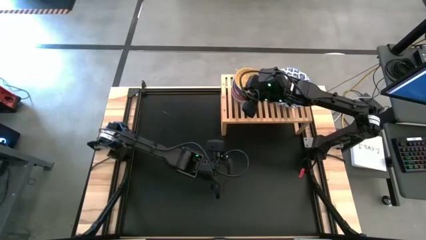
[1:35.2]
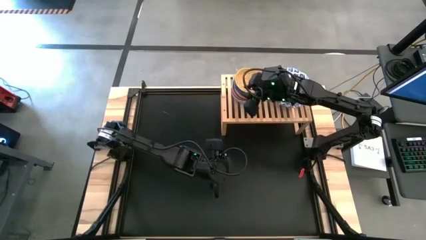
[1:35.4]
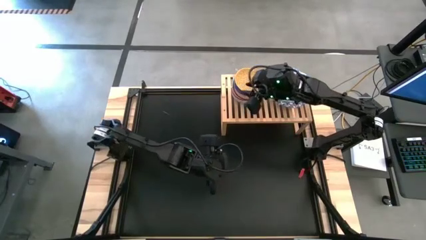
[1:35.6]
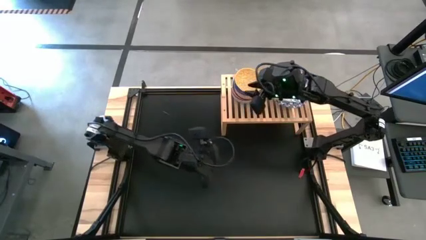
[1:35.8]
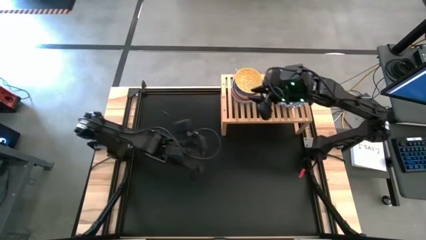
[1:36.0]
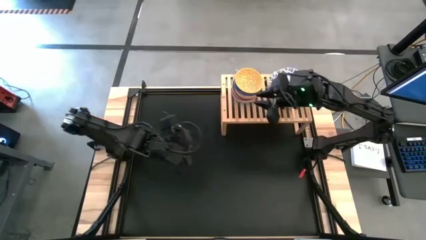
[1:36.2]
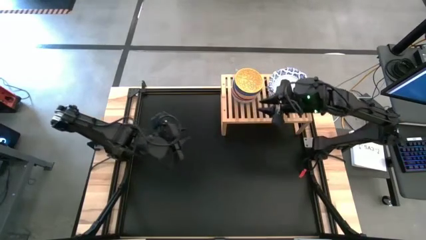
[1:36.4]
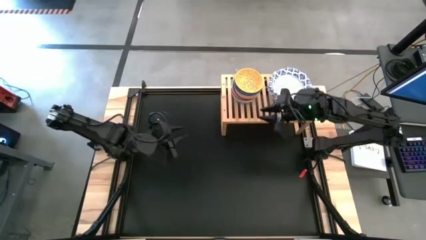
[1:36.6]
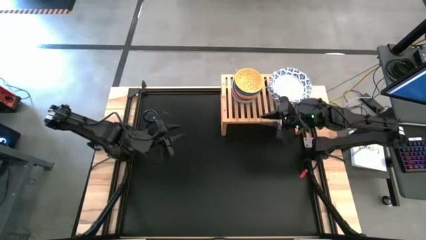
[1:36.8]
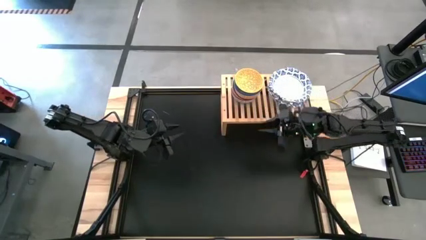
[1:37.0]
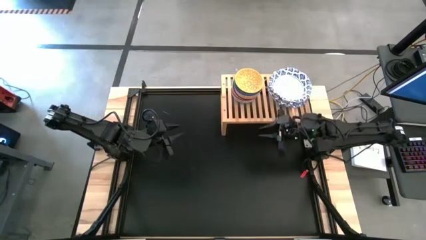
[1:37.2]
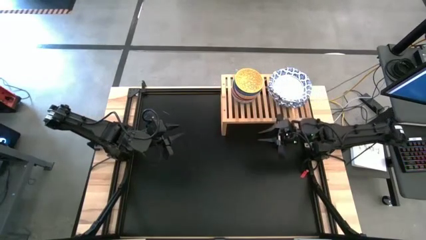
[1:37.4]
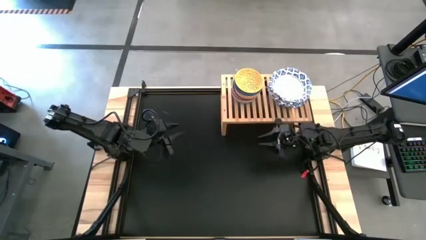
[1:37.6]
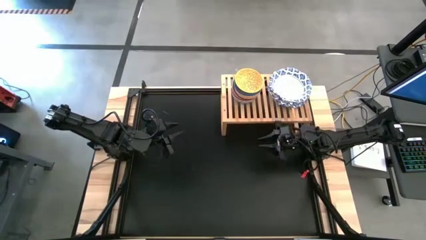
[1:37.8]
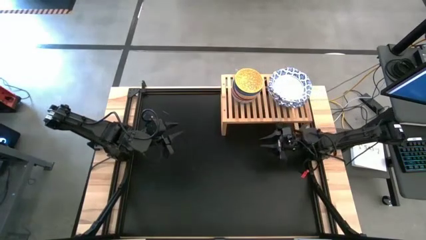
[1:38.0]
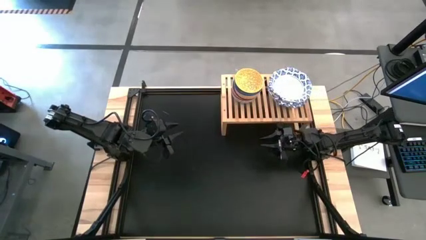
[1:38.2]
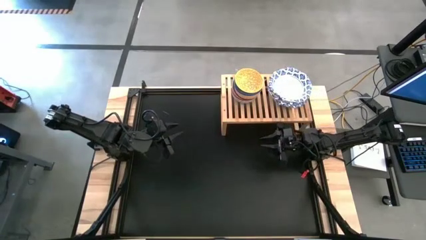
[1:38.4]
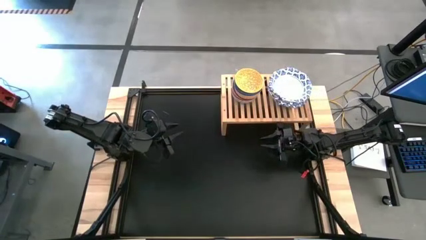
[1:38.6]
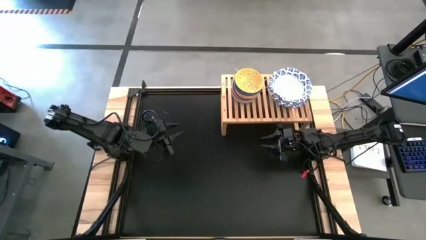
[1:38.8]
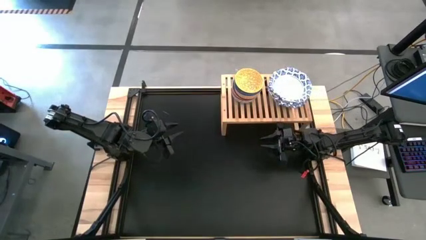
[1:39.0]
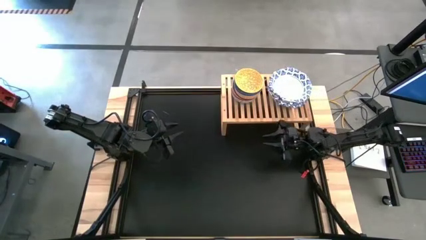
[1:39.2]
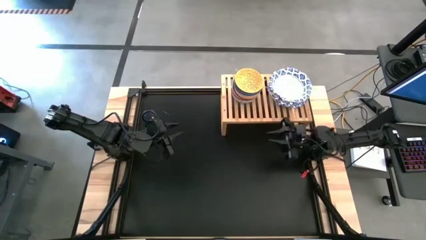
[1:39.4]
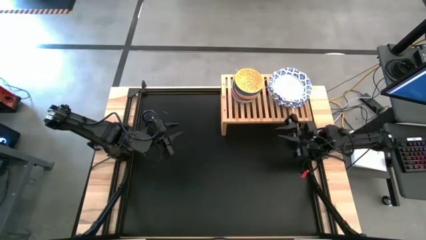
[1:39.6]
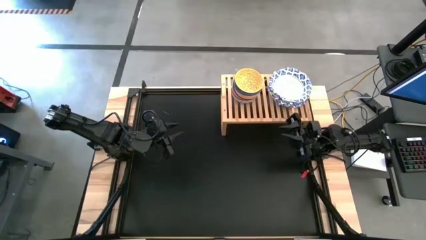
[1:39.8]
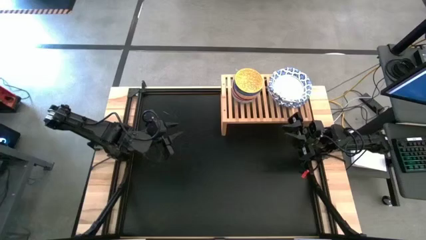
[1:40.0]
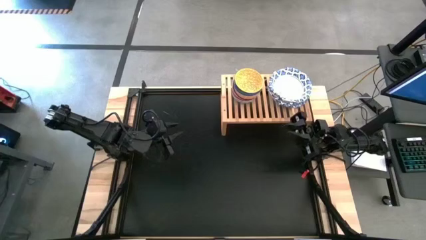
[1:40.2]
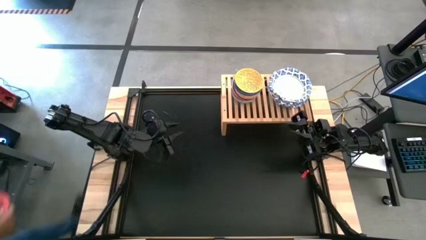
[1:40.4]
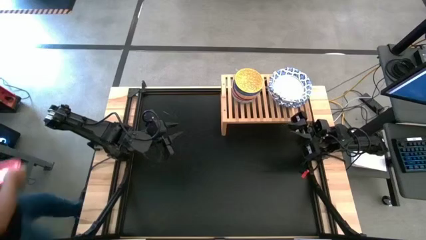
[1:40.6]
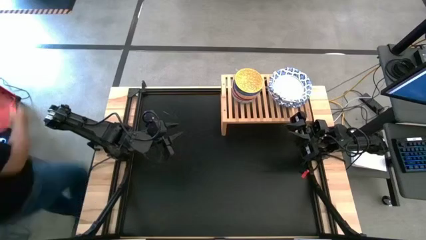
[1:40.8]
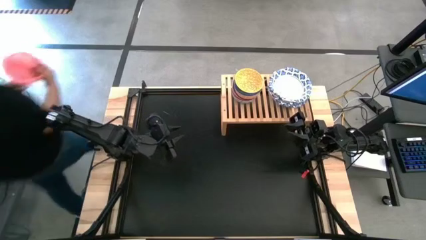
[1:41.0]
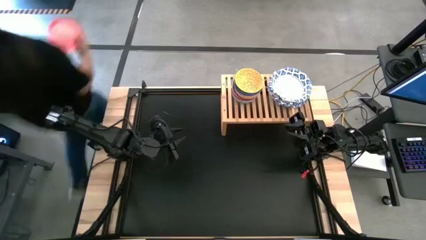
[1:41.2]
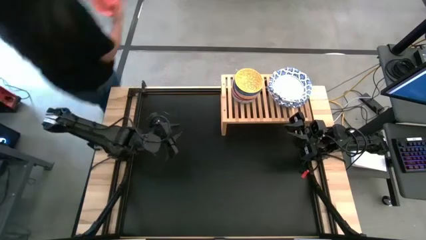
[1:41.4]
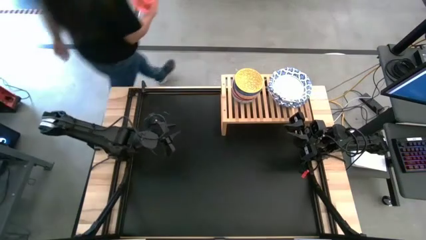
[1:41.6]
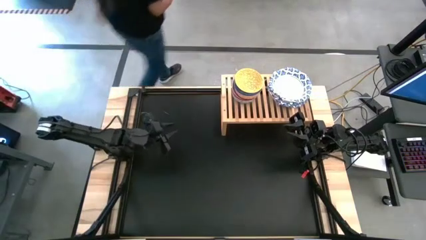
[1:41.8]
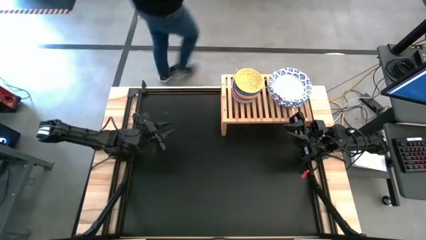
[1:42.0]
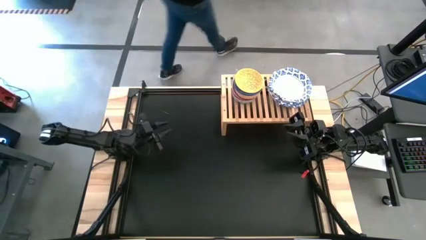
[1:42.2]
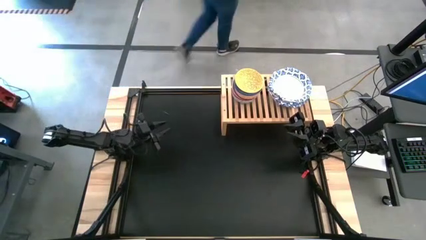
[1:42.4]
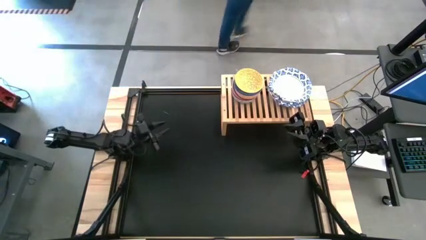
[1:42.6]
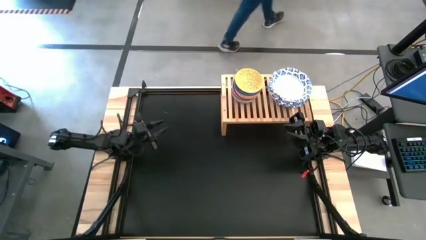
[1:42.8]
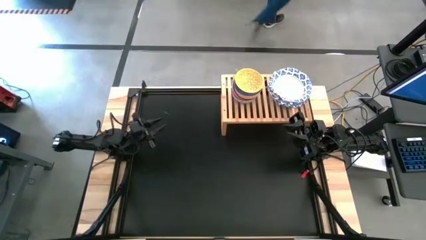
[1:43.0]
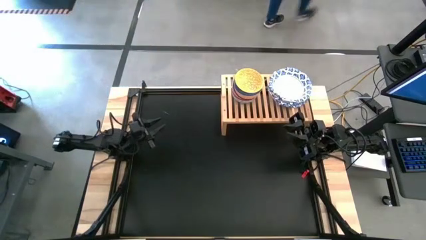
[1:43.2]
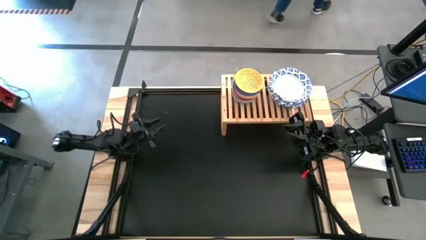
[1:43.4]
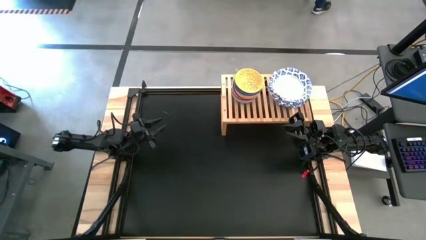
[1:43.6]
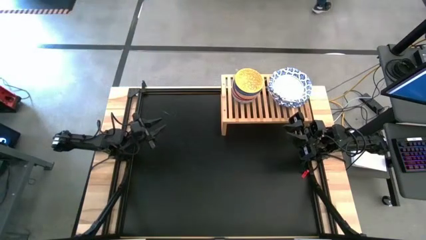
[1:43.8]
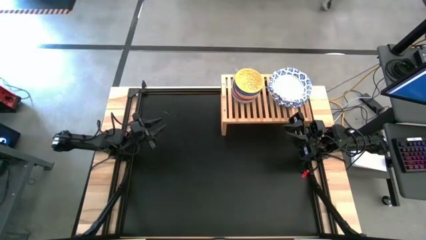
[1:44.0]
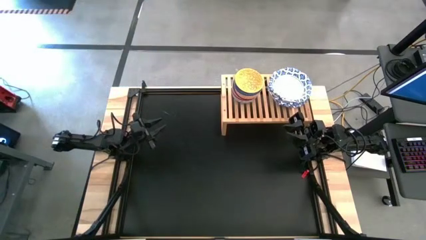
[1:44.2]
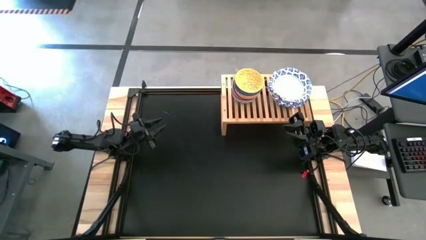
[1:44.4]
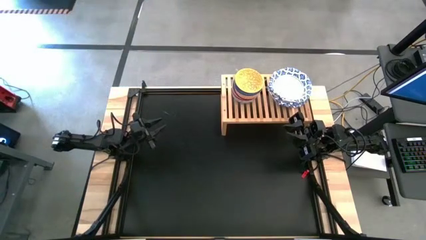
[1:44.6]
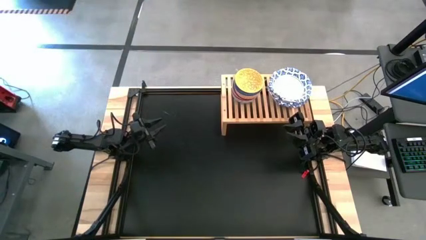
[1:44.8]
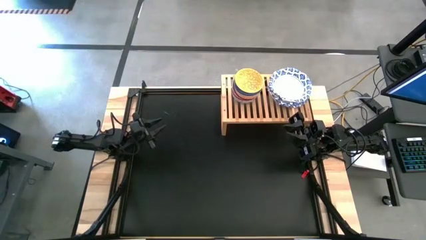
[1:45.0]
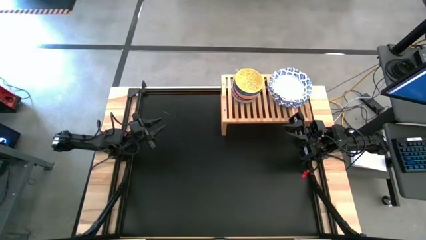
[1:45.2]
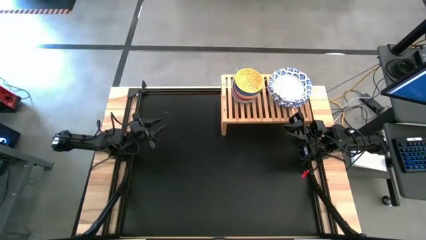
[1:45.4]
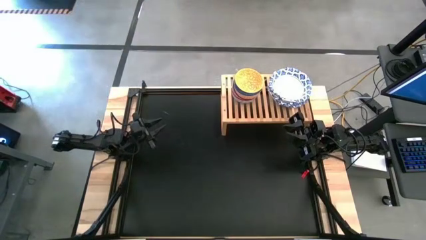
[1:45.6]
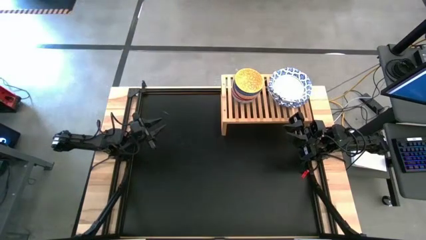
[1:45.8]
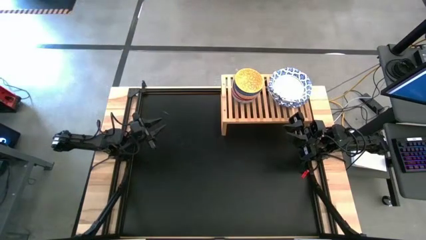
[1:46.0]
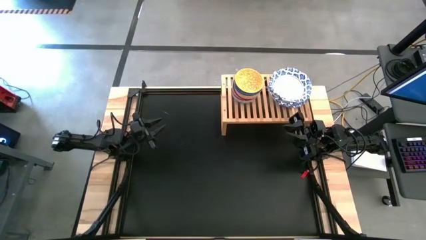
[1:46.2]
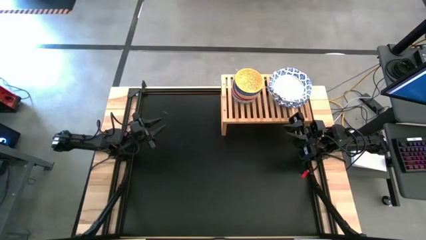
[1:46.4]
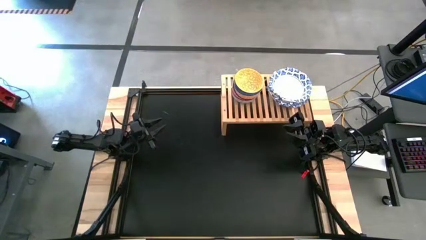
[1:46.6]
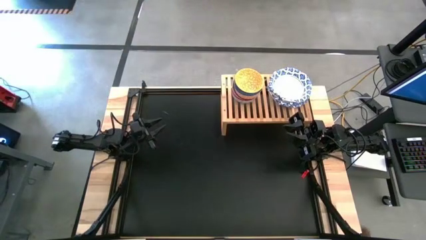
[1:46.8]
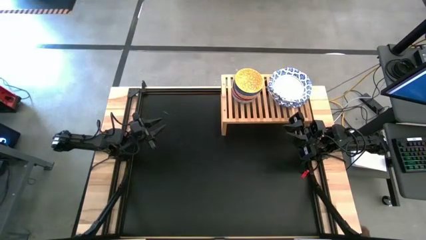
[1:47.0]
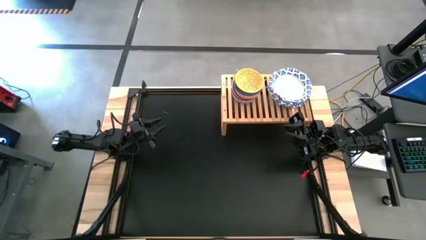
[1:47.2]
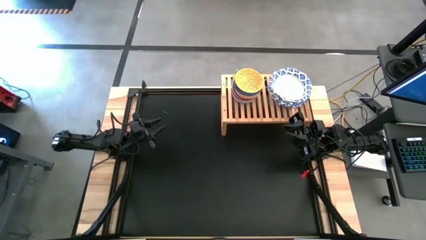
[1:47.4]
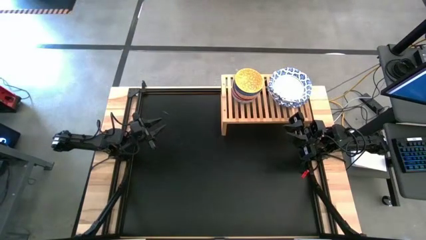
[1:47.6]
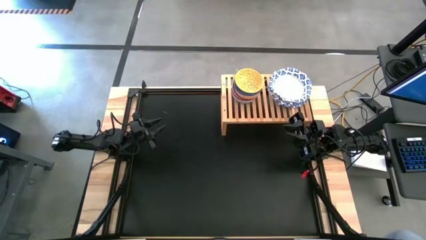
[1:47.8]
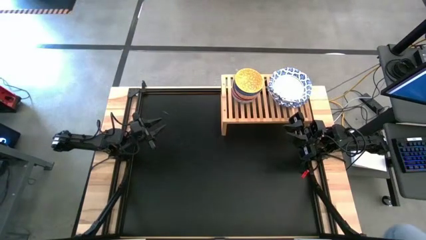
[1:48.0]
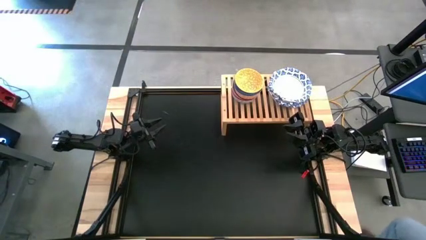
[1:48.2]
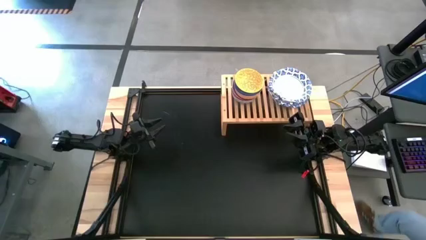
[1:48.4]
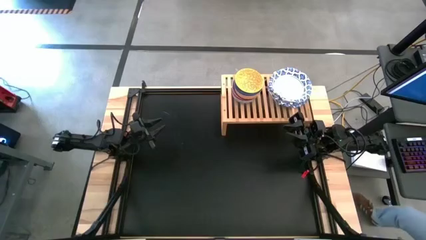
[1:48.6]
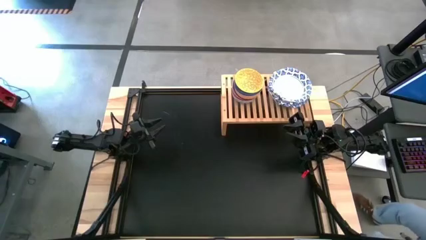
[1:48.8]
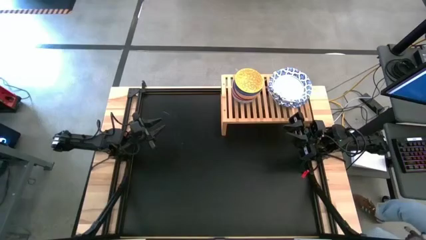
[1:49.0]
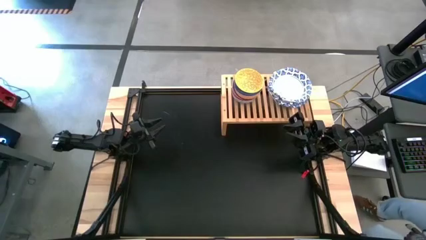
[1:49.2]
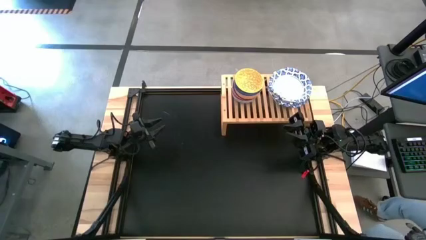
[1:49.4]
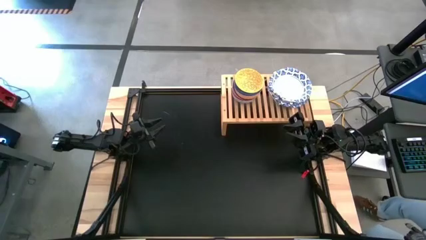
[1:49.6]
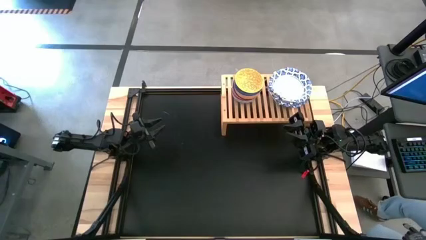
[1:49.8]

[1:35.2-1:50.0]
Task: Place and stack bowls onto a shelf
Return to Home Position

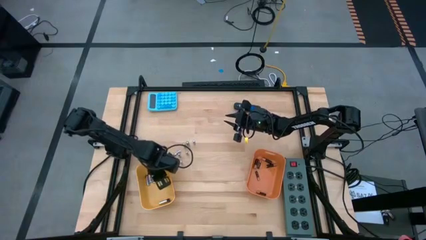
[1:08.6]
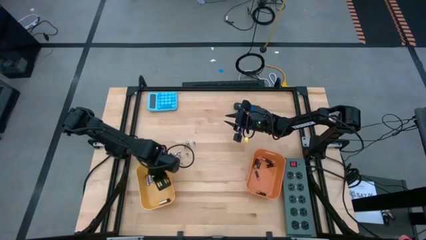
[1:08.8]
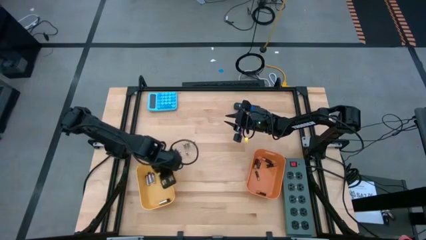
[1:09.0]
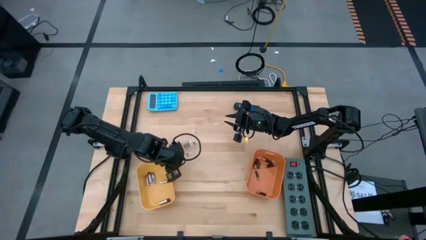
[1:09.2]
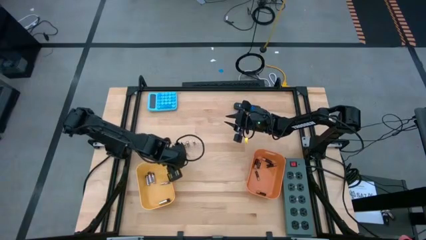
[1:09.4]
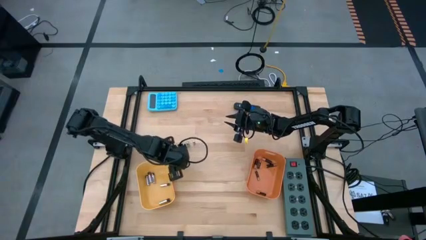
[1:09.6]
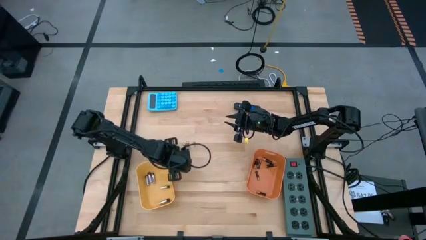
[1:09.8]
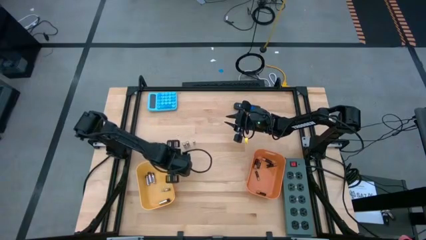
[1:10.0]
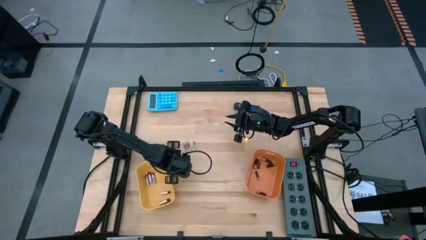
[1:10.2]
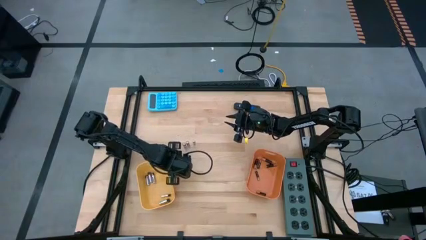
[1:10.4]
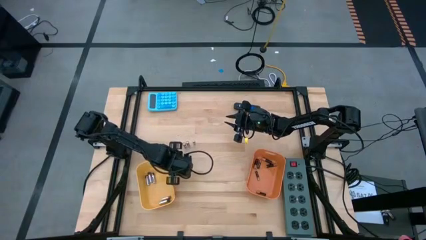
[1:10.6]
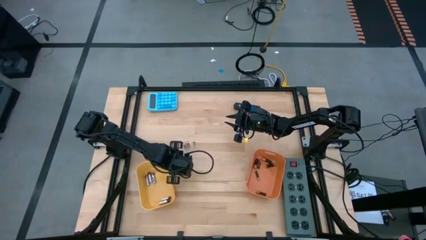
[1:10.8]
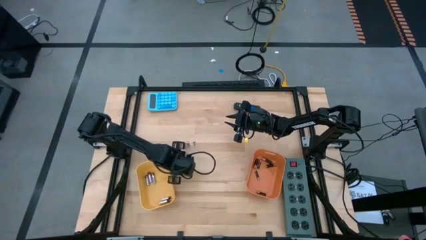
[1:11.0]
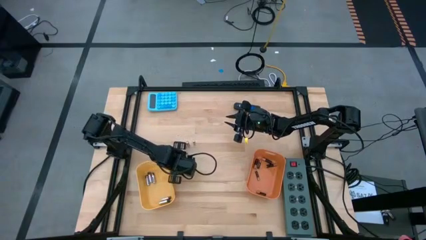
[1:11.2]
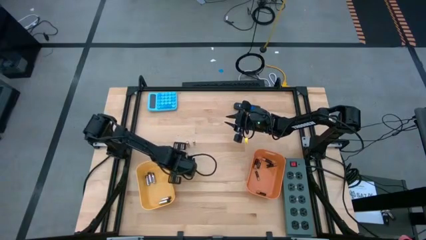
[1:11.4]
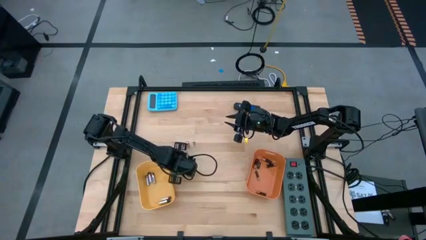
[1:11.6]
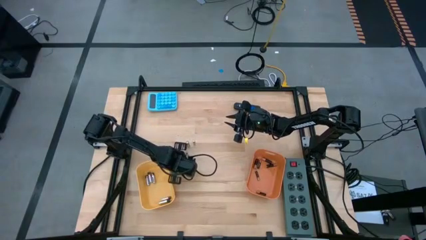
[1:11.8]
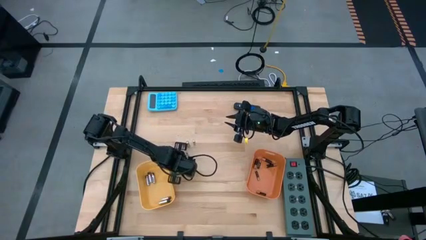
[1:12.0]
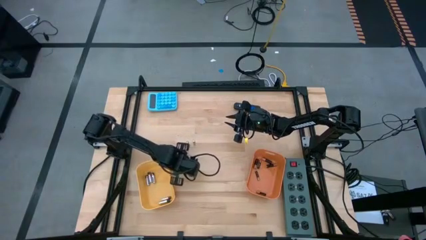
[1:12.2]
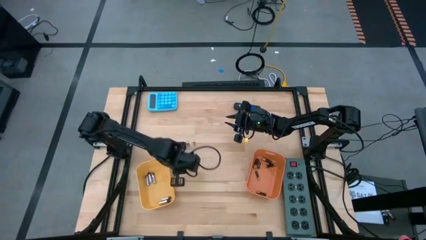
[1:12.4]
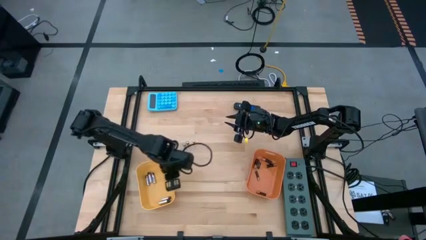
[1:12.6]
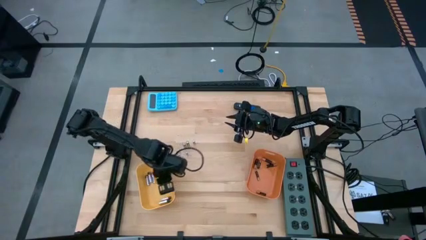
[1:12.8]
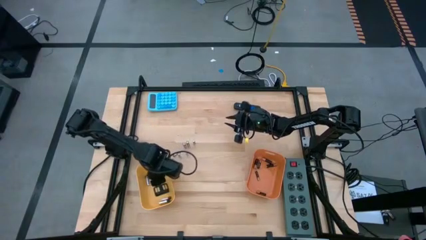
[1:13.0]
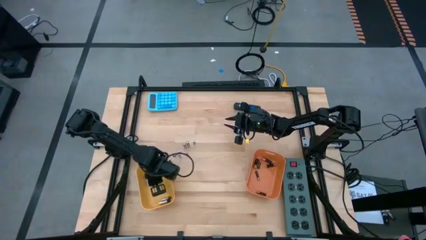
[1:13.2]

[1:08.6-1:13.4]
Task: Sort batteries
Put the silver battery into the yellow bin
